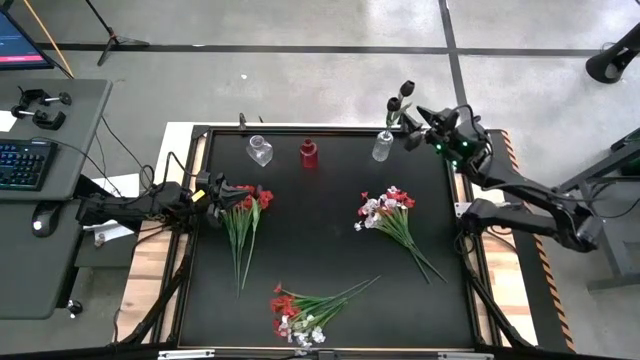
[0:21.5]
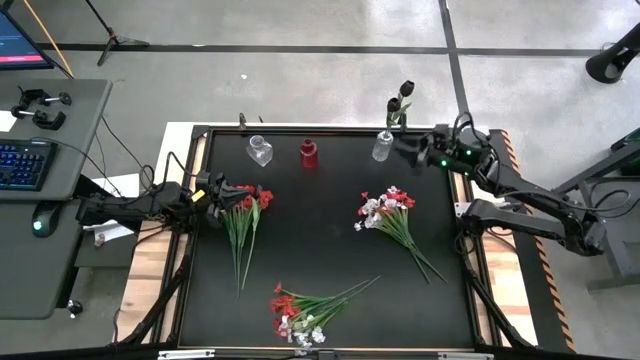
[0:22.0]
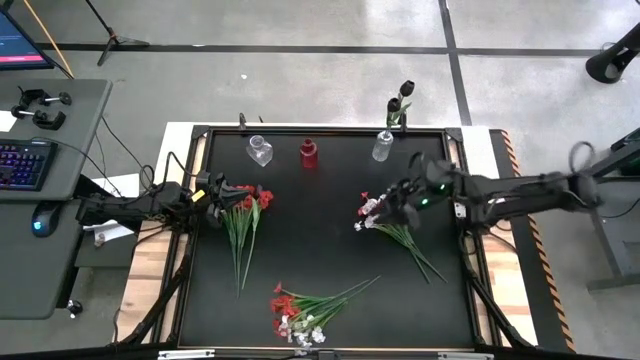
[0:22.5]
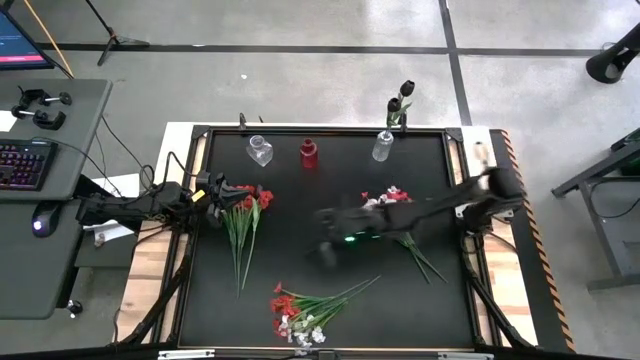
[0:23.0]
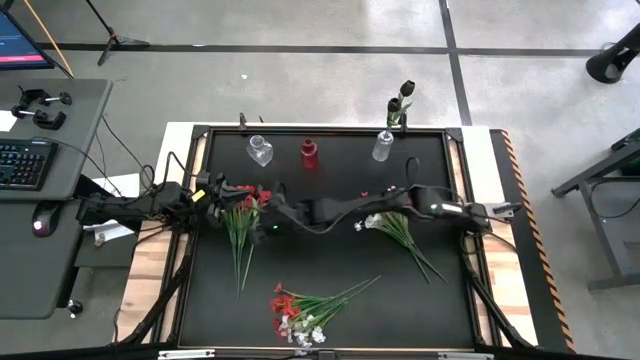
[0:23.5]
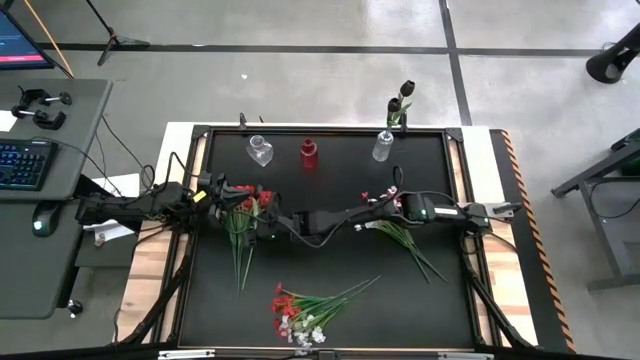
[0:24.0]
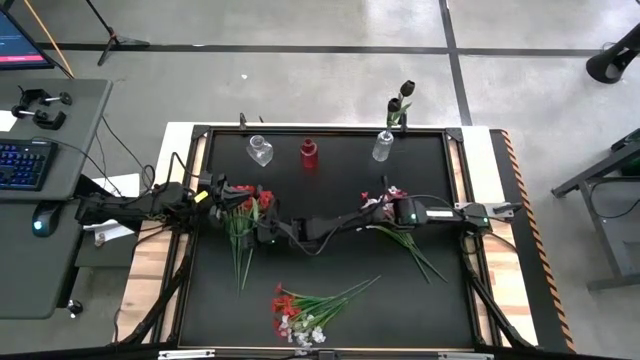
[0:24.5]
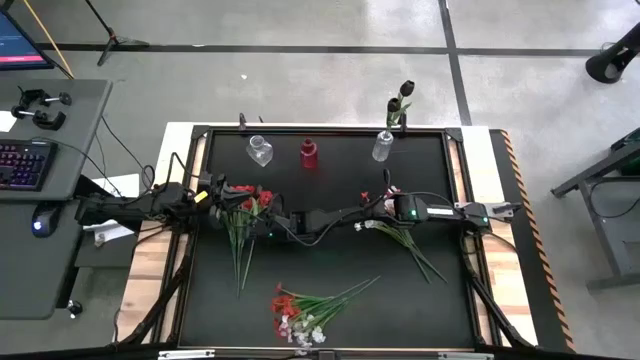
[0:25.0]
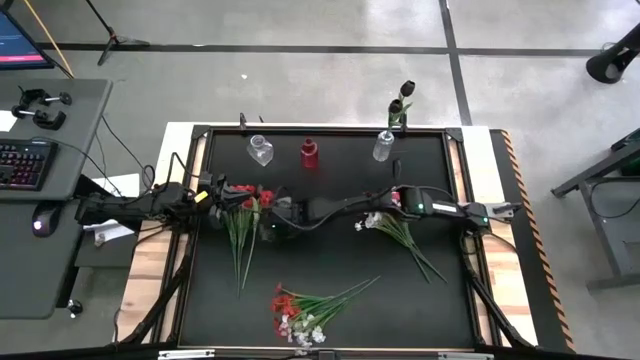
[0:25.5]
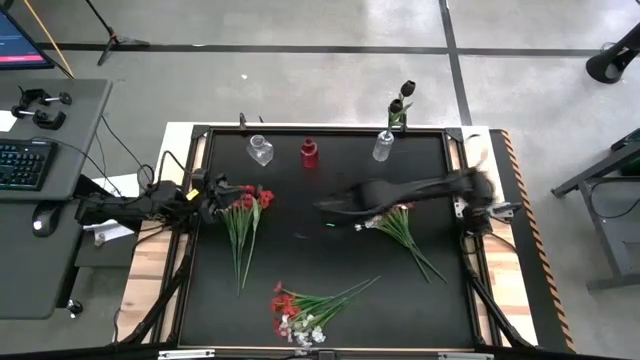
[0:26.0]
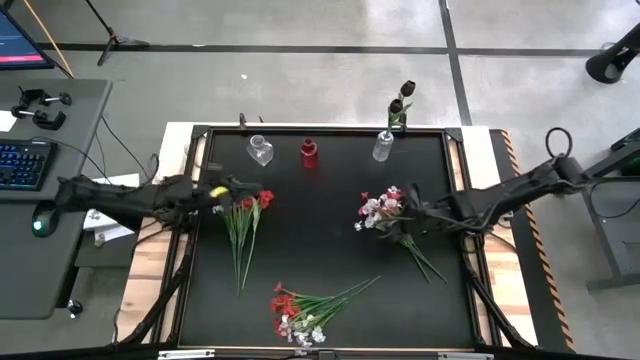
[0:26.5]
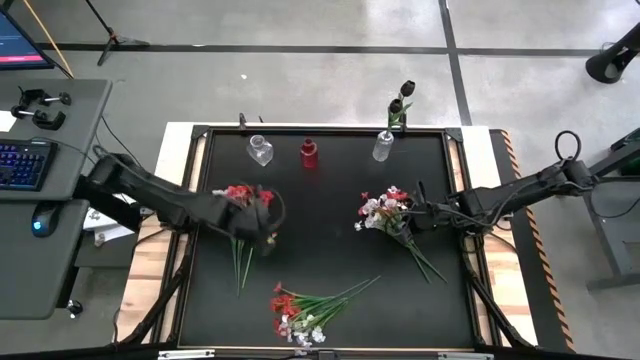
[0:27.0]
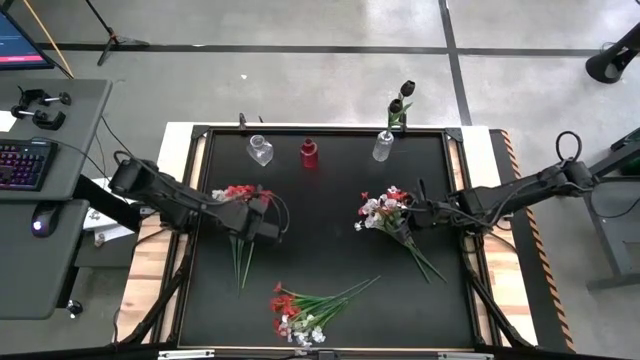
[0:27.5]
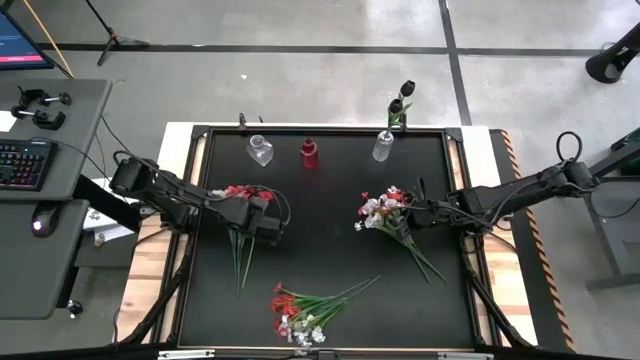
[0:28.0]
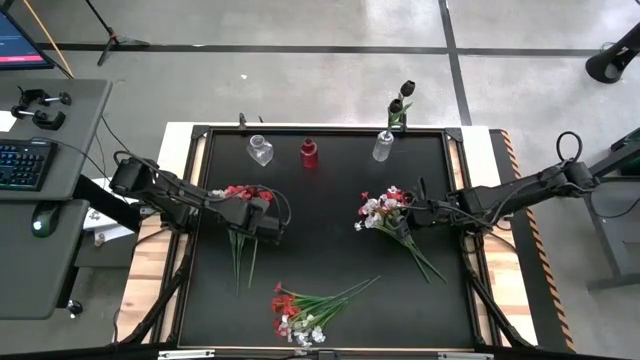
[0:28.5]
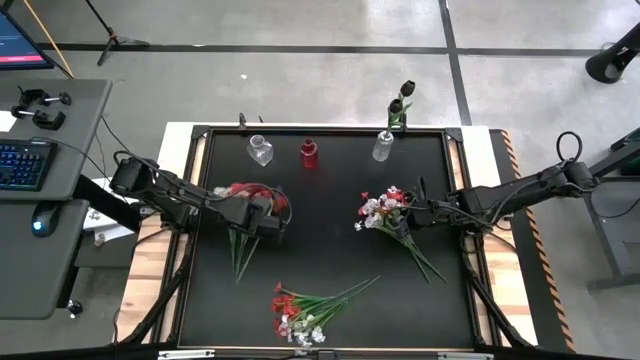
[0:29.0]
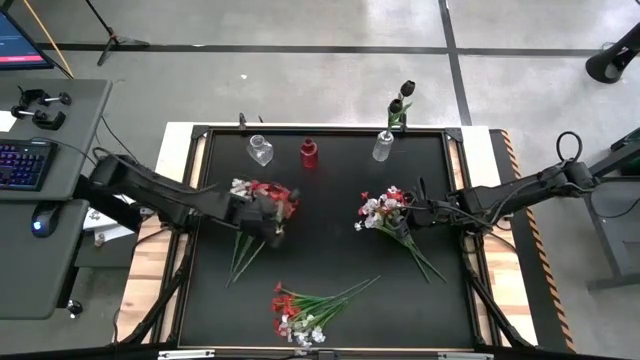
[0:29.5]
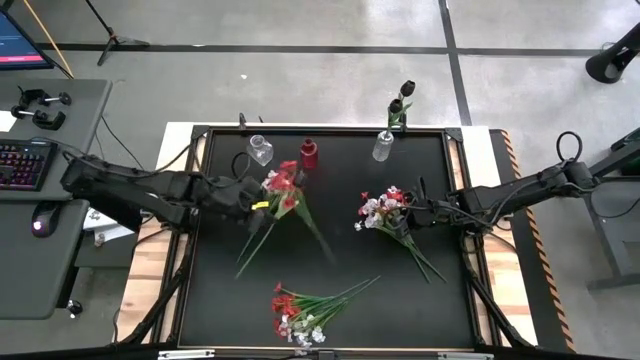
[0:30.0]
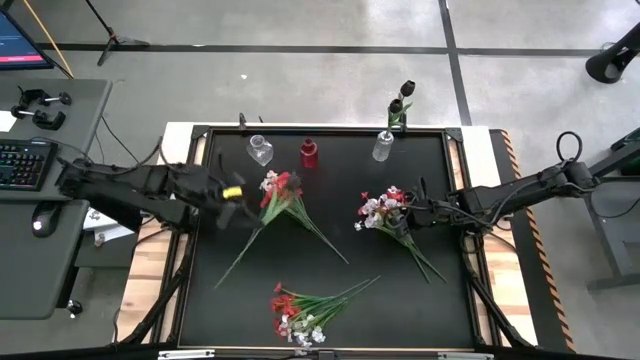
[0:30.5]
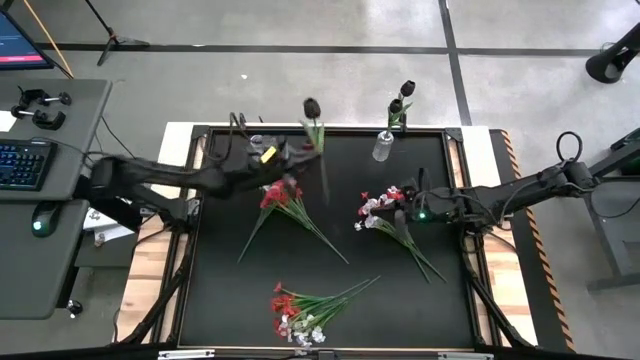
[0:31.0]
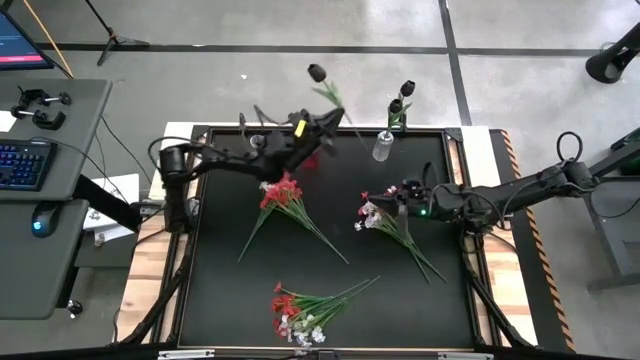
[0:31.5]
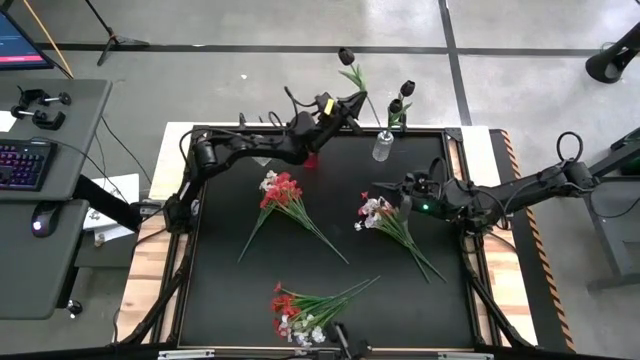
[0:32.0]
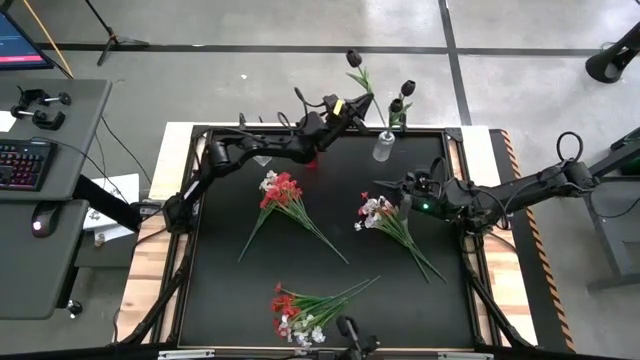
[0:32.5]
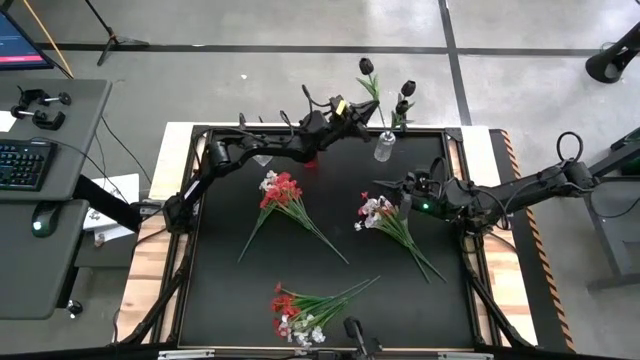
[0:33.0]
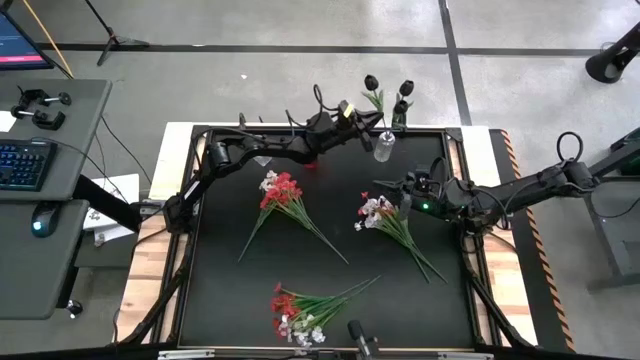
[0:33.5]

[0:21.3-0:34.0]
Task: Sort flowers into vase by color
Put the black flower into the right transparent flower vase

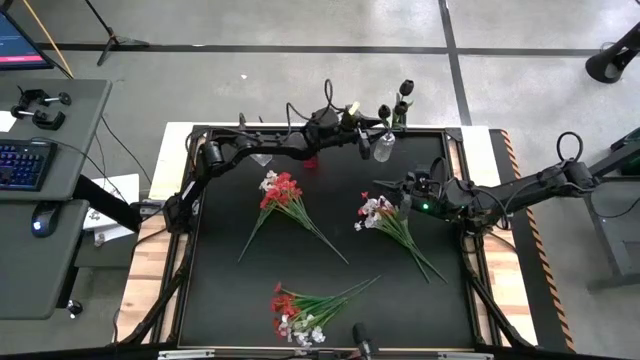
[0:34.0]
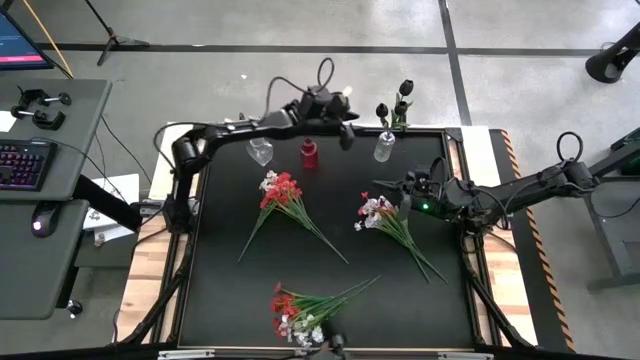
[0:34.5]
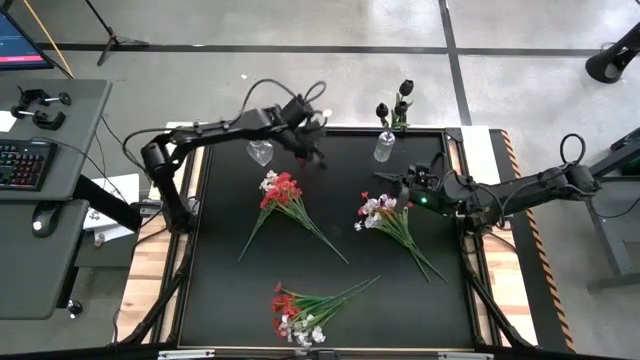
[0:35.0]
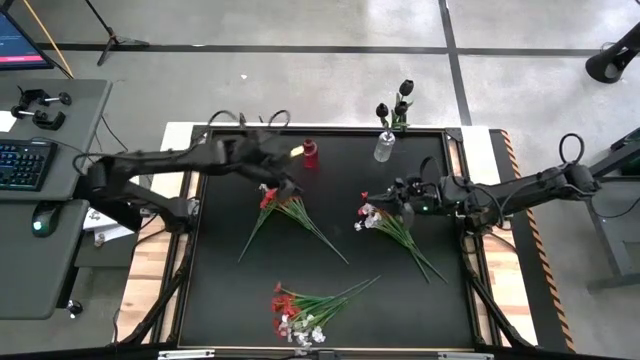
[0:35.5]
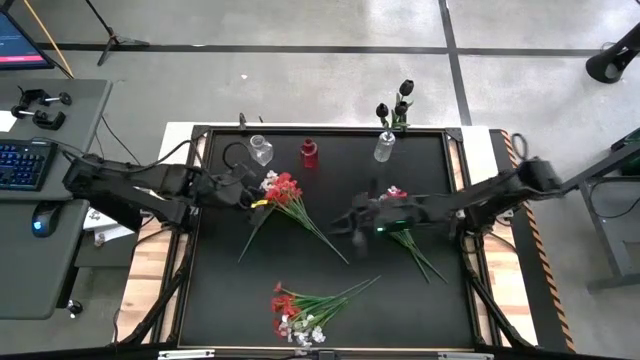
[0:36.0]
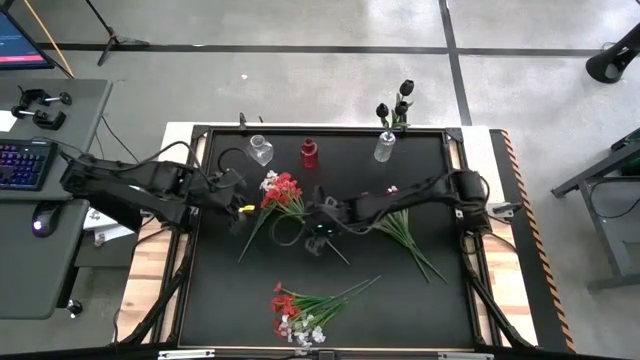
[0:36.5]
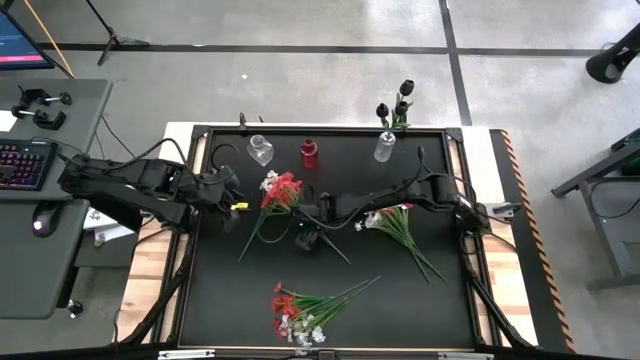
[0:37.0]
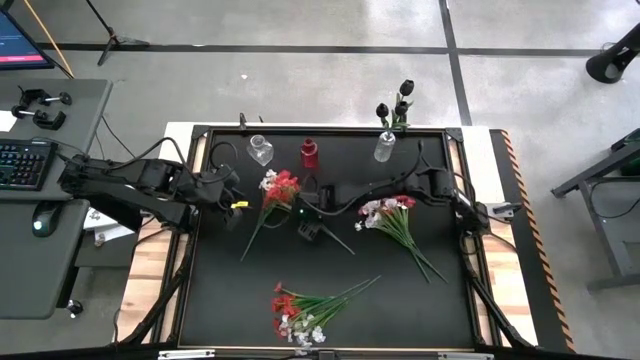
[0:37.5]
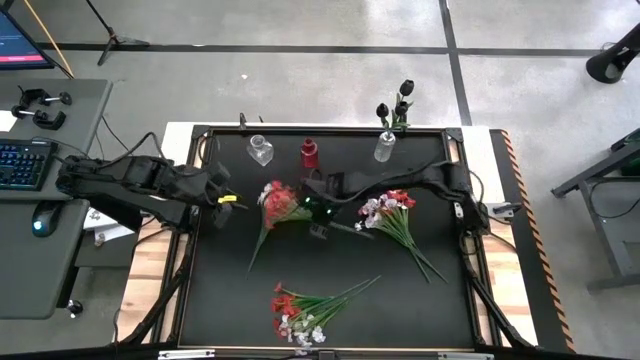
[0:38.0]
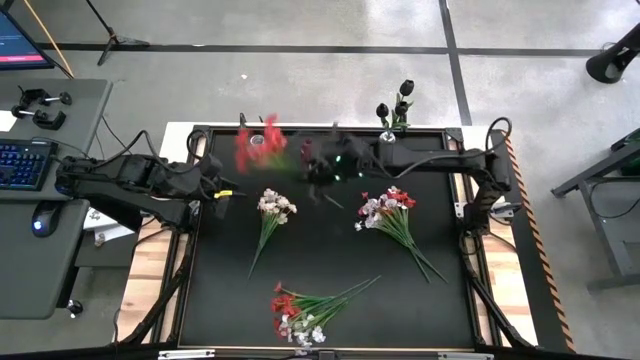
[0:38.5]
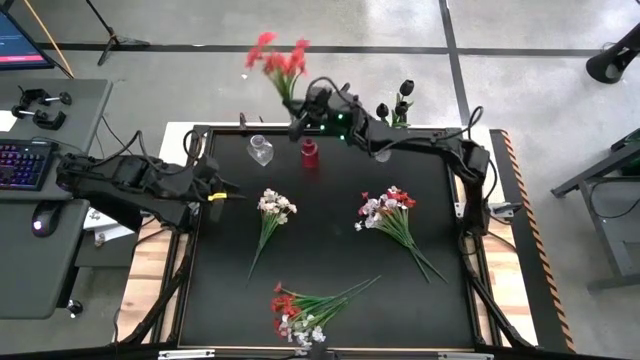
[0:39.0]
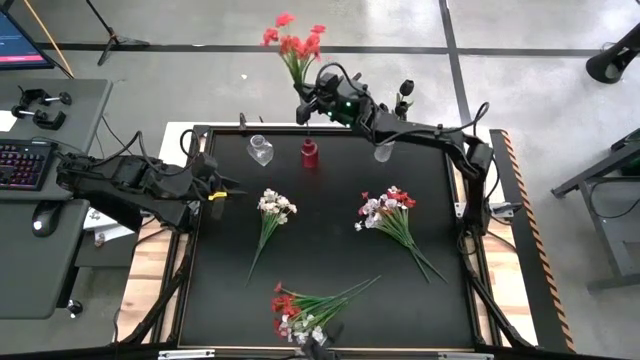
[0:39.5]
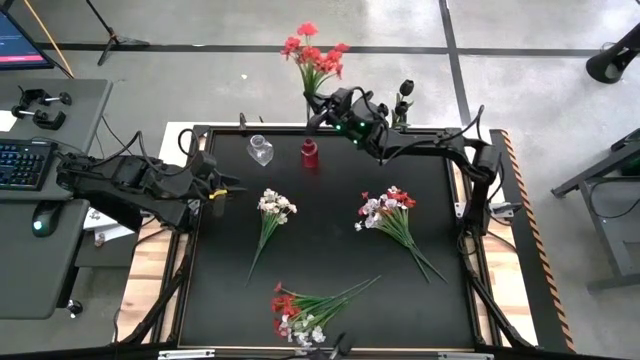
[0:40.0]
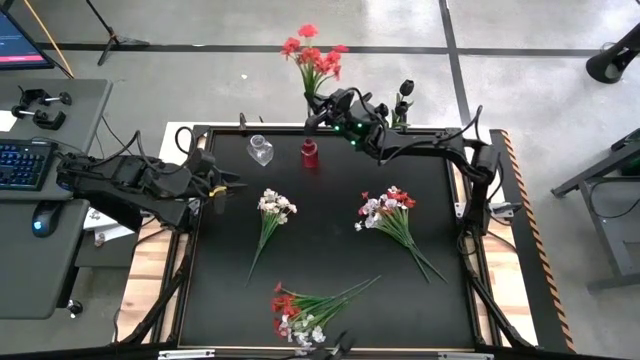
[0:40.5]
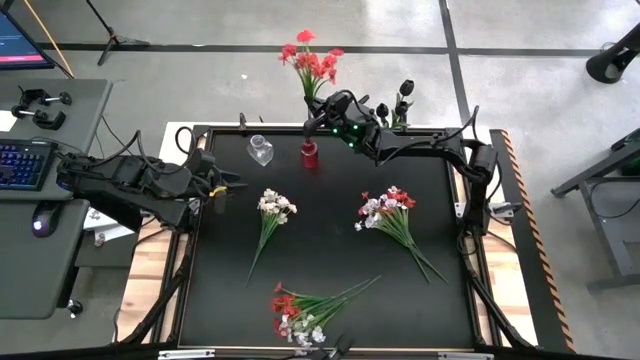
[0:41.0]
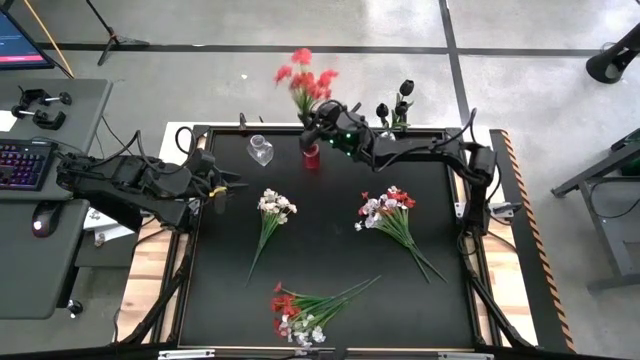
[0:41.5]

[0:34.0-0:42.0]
Put the top left red flowers into the red flower vase

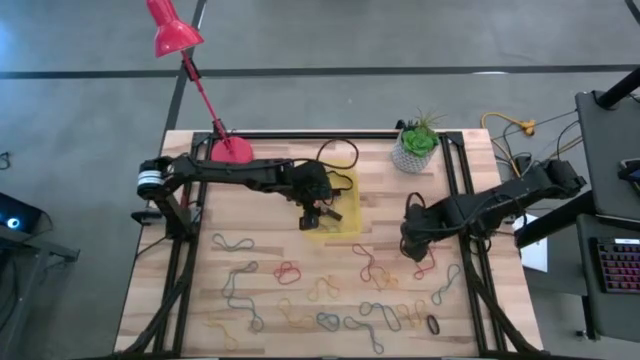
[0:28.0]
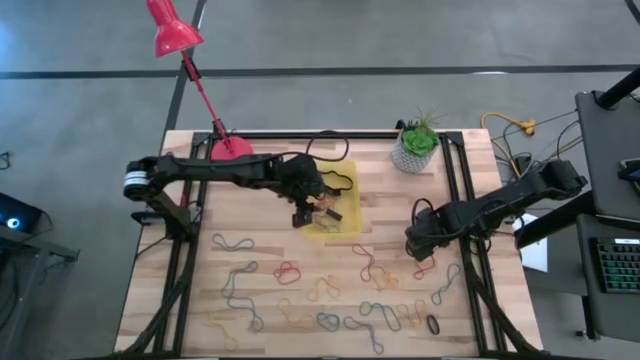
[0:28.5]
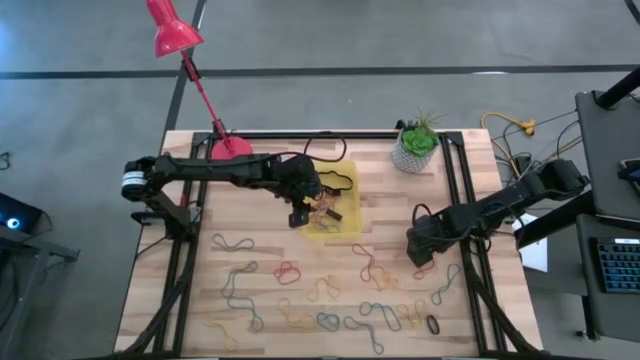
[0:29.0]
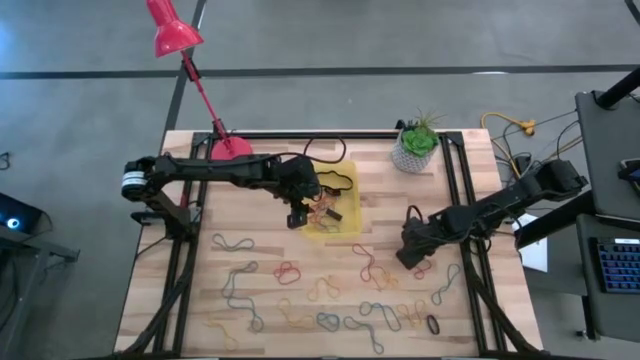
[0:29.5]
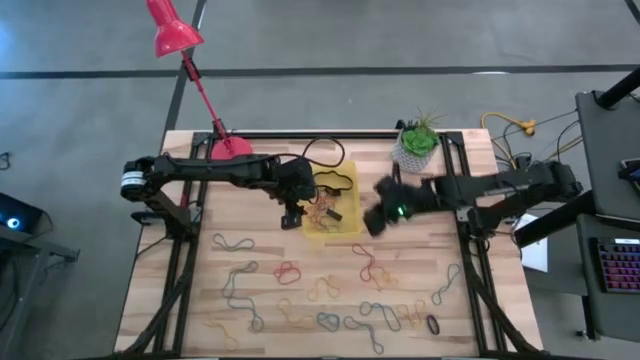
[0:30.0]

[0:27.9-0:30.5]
Task: Pick and place rubber bands into bin
Put the red rubber band into the yellow bin
